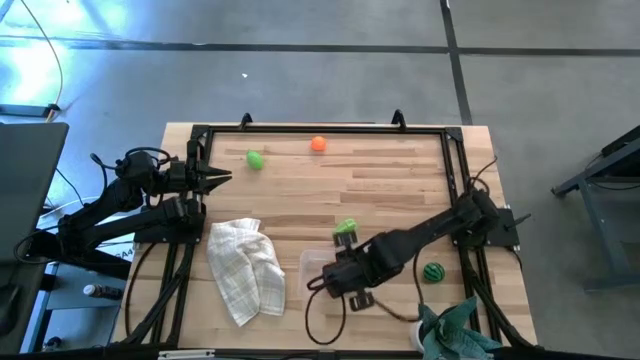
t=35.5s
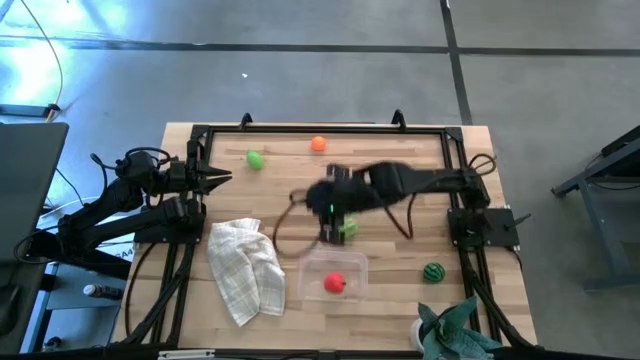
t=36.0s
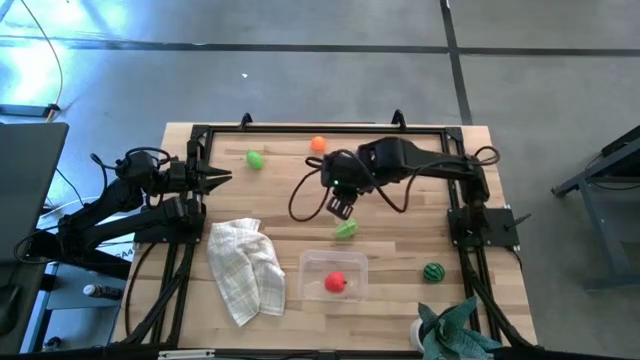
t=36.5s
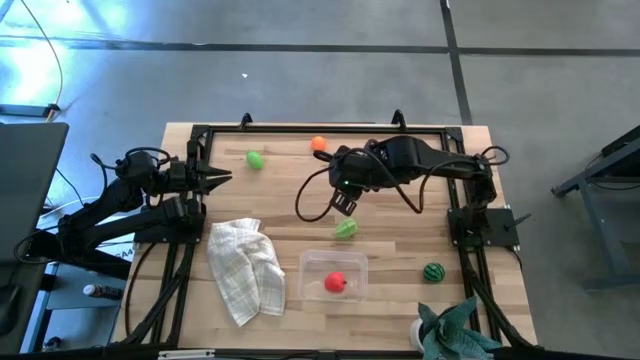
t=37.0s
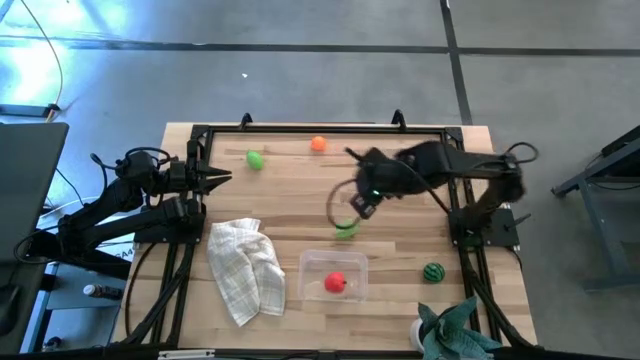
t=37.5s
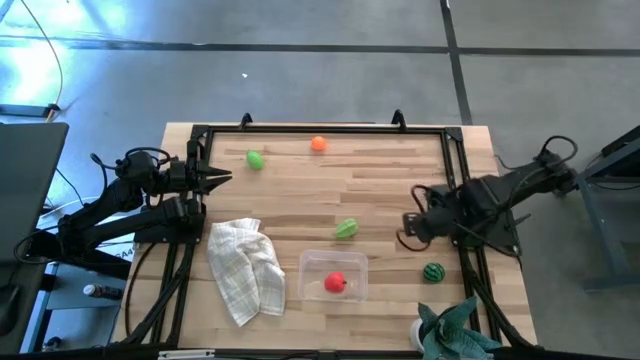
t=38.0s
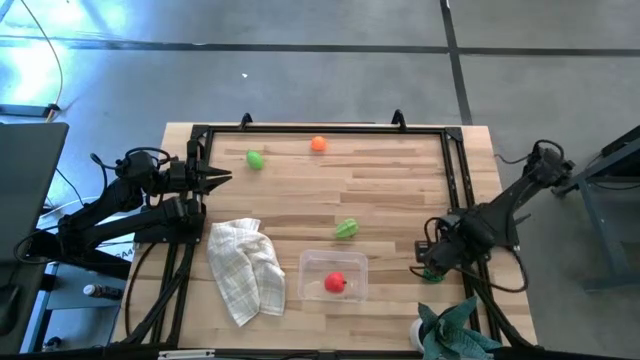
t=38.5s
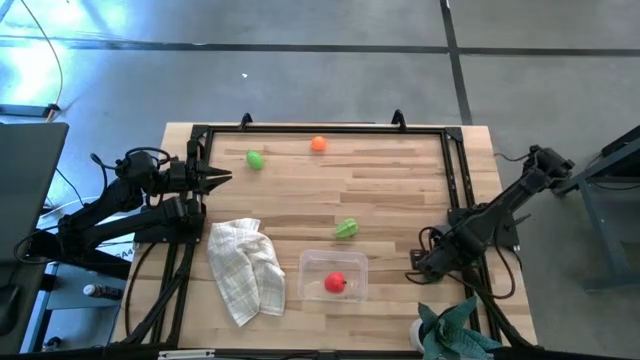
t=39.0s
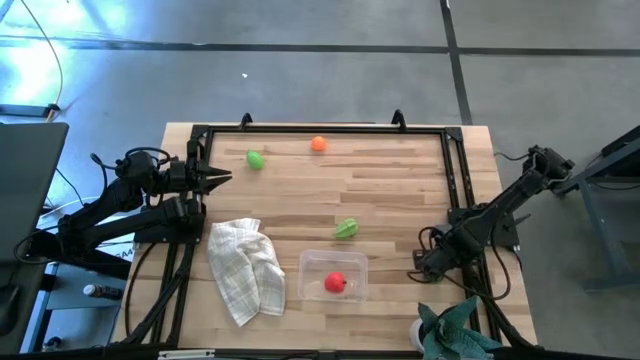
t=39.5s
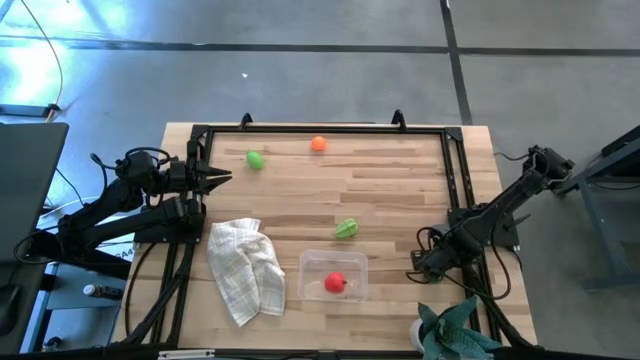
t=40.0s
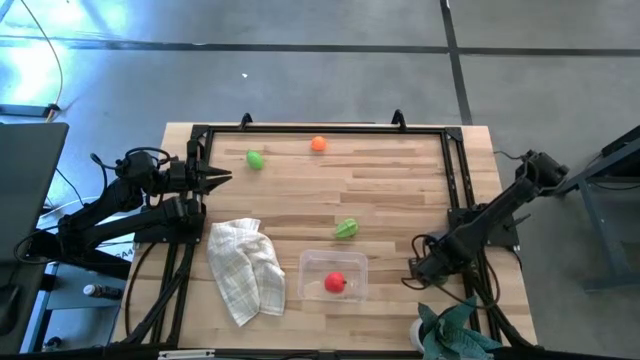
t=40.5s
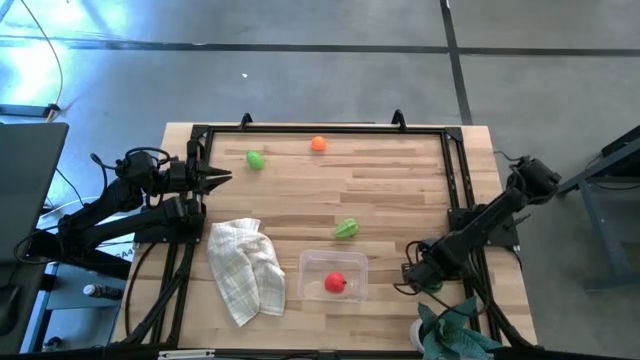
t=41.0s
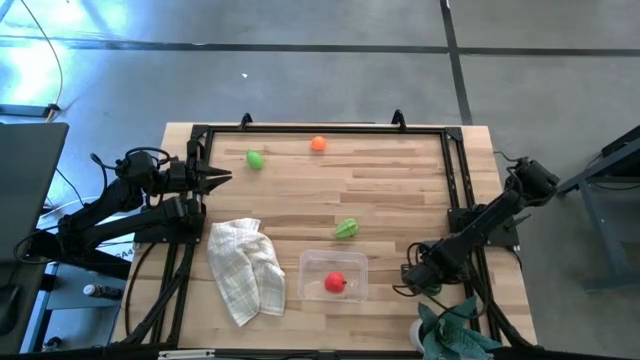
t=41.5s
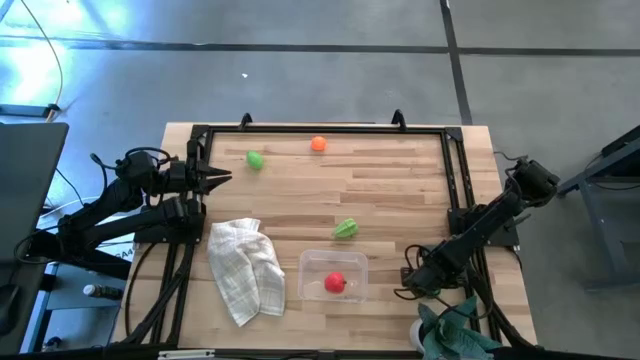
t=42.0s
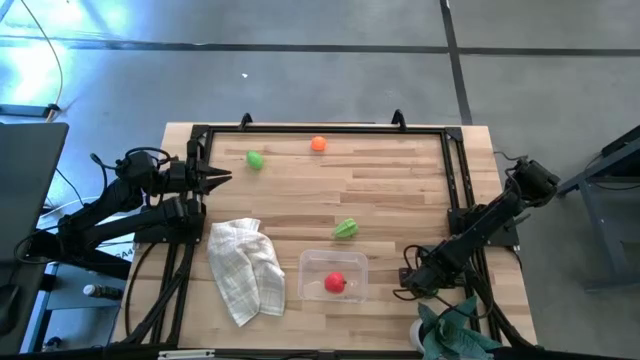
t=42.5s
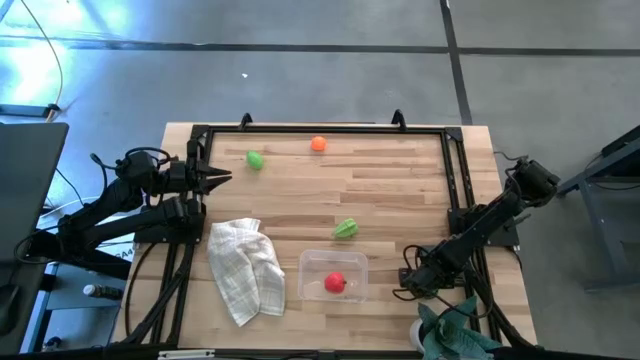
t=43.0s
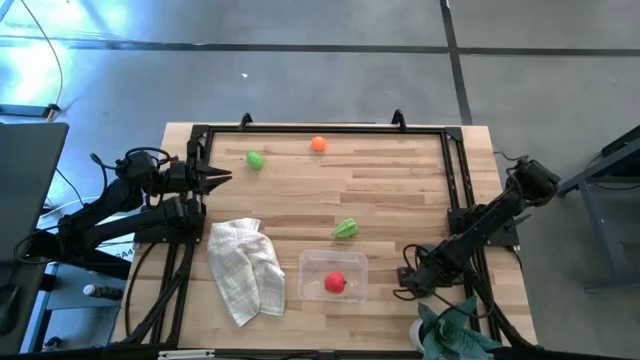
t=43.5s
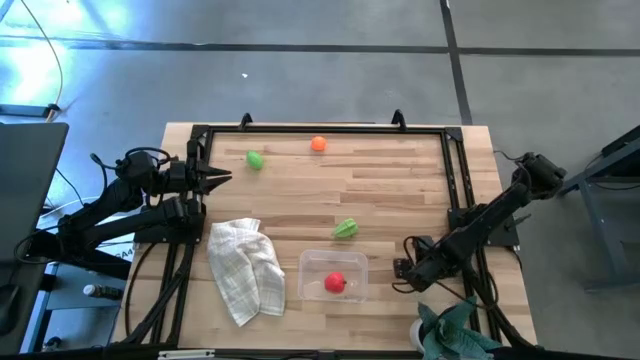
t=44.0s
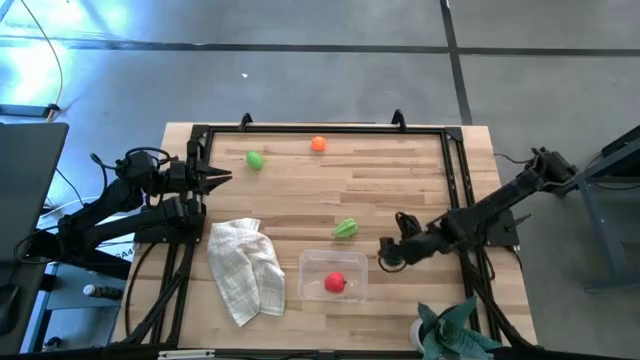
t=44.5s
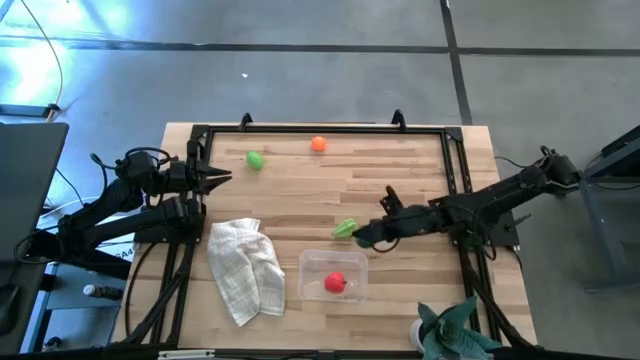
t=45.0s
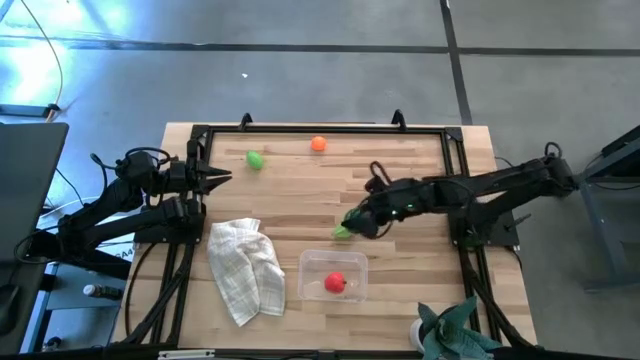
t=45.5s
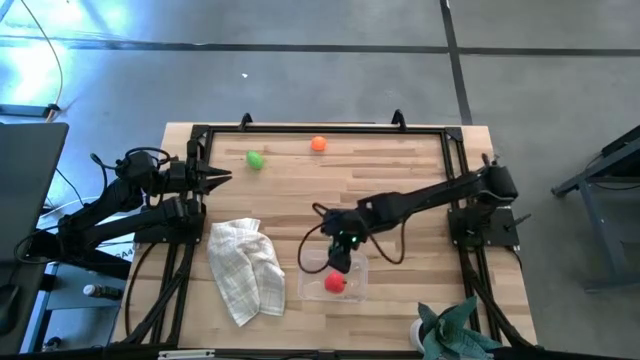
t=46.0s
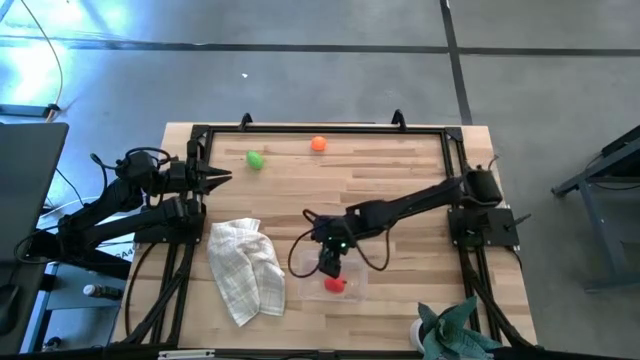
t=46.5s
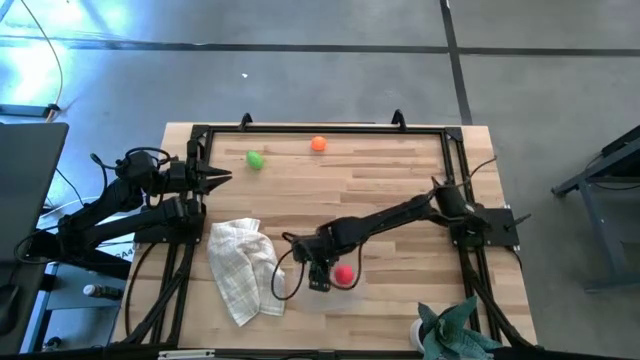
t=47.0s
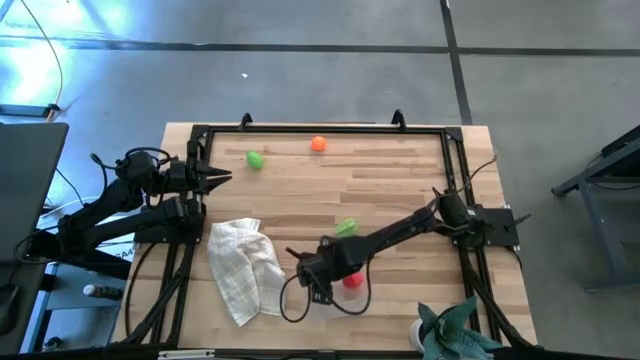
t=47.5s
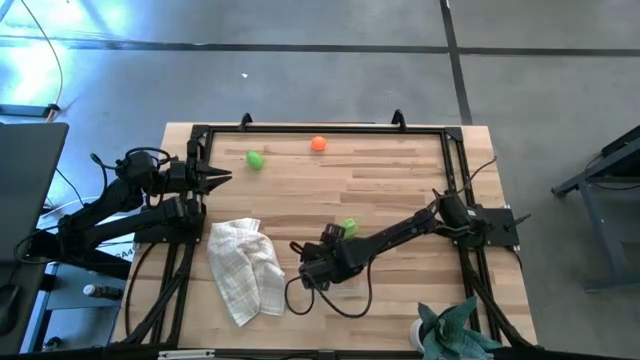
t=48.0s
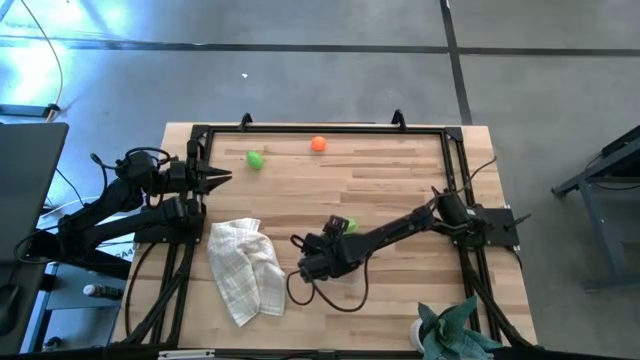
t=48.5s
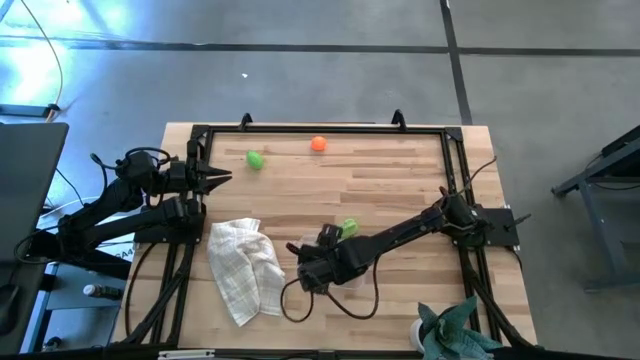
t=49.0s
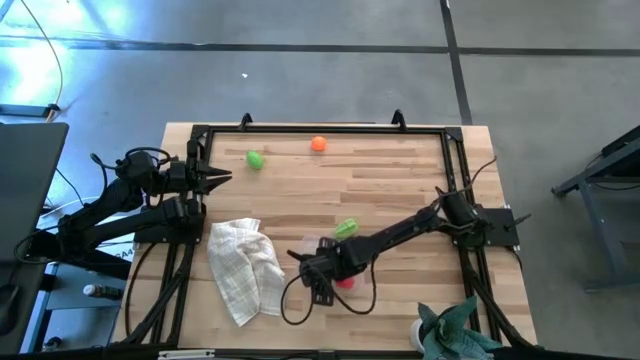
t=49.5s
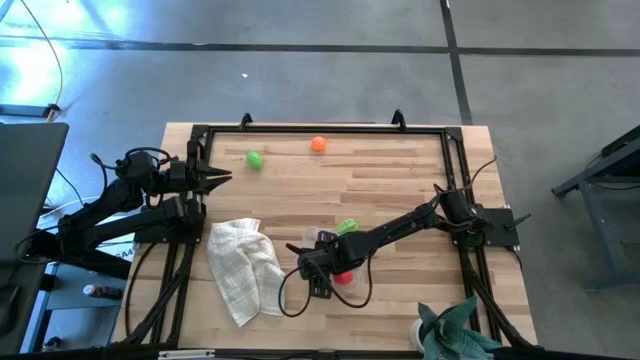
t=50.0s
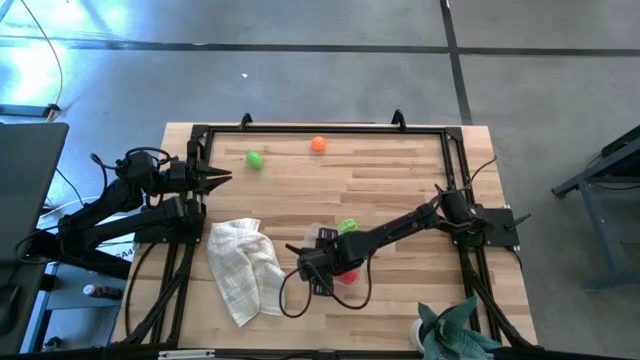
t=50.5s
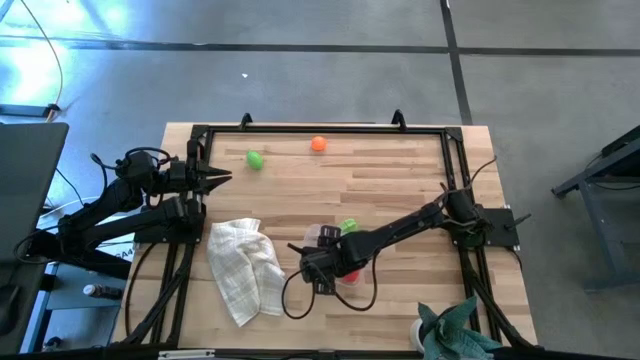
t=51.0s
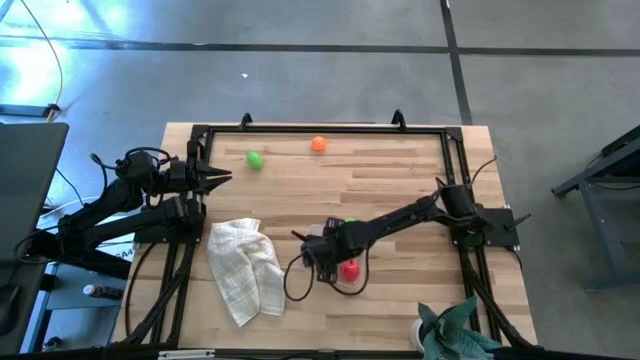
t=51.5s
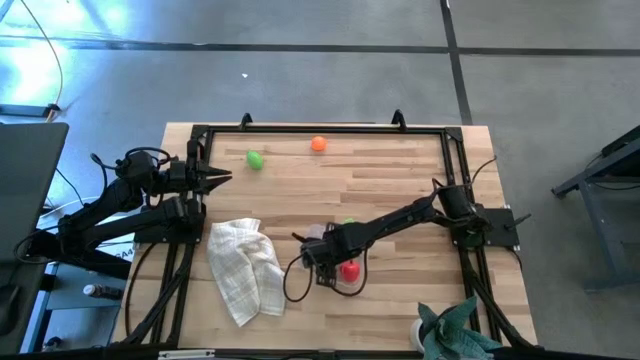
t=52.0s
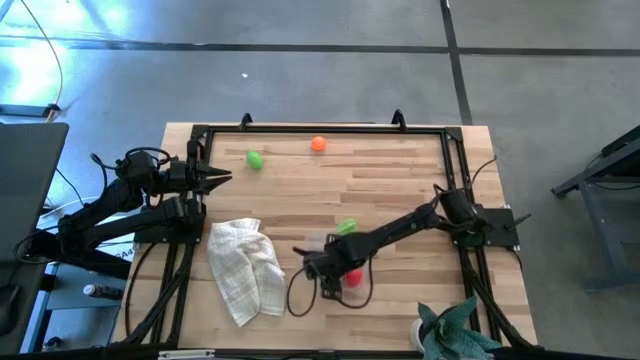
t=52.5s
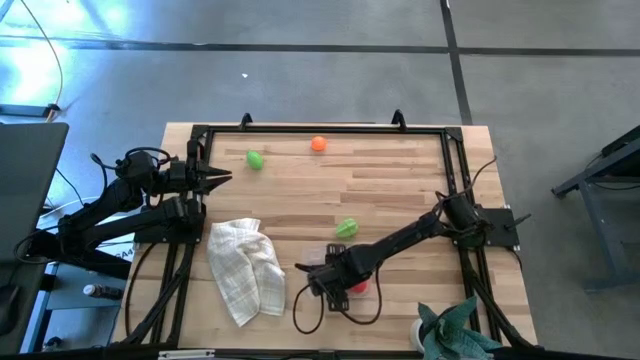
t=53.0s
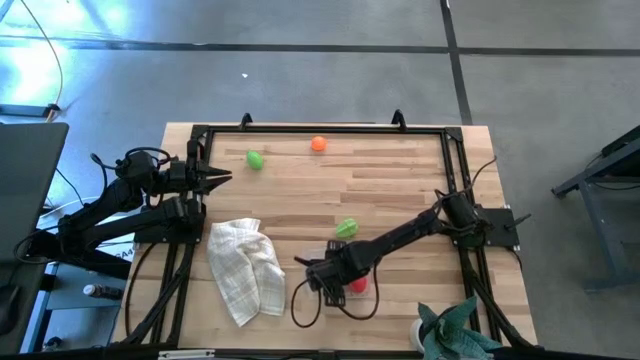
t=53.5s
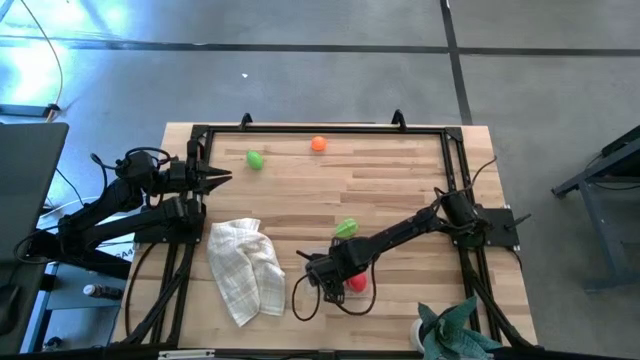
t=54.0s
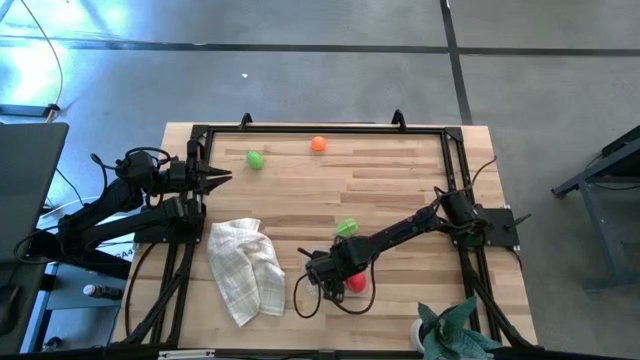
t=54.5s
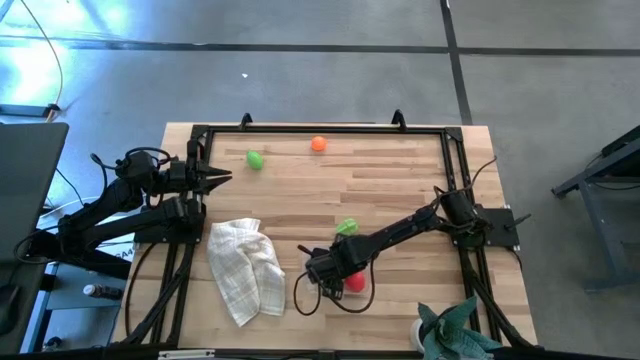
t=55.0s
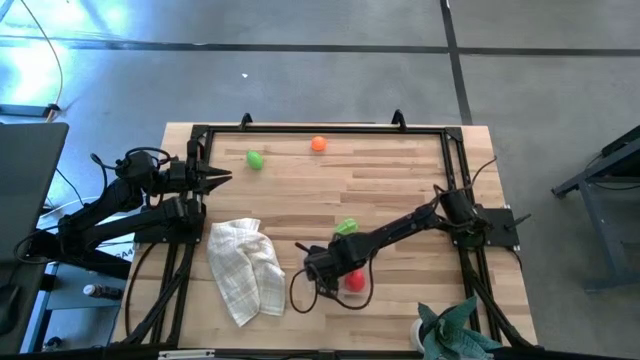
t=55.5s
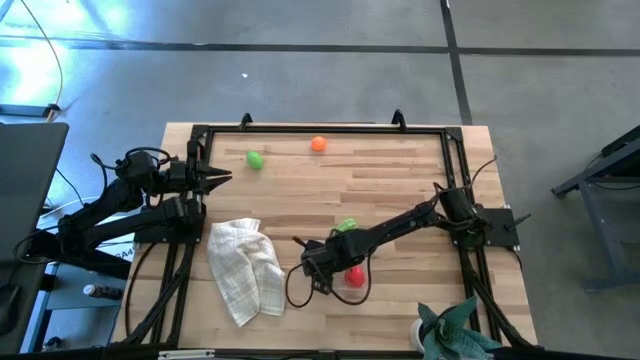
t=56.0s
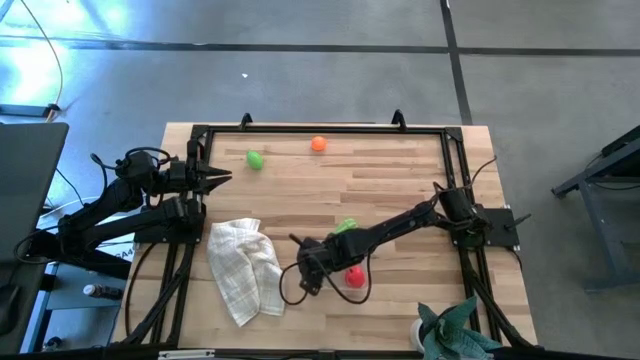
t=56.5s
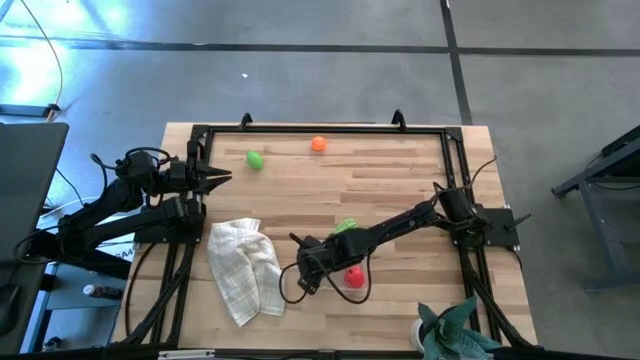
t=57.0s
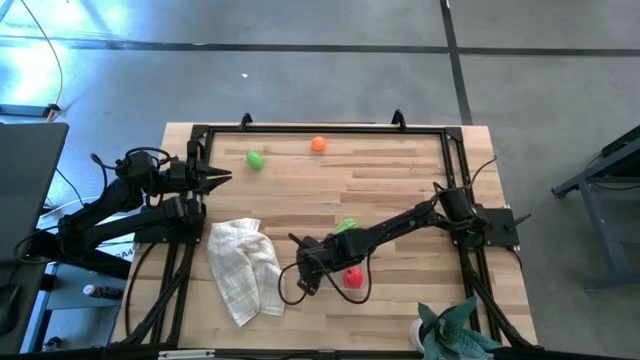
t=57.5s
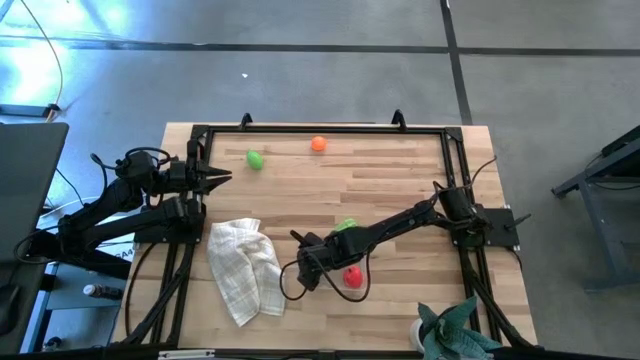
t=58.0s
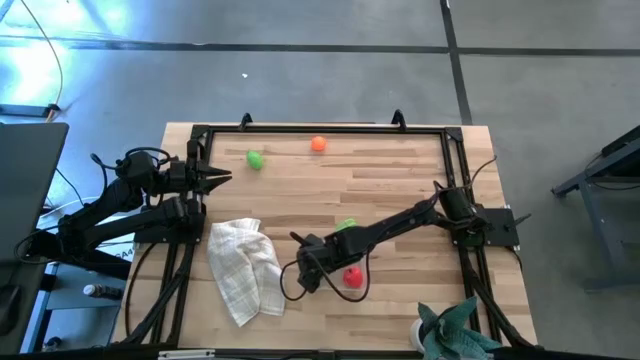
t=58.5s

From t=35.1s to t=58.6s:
Task: Pick and placing Produce into tupperware
Put the green watermelon into the transparent bin
